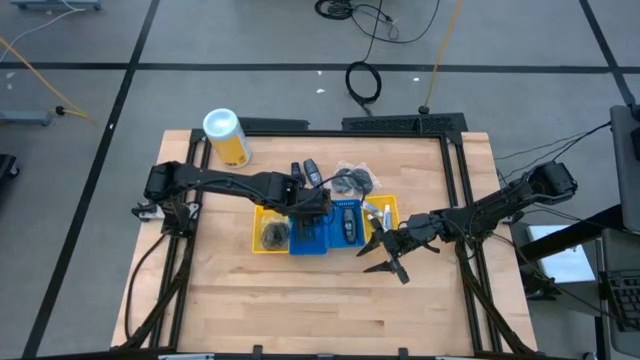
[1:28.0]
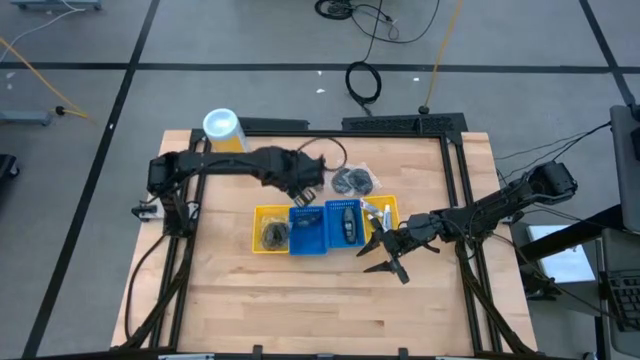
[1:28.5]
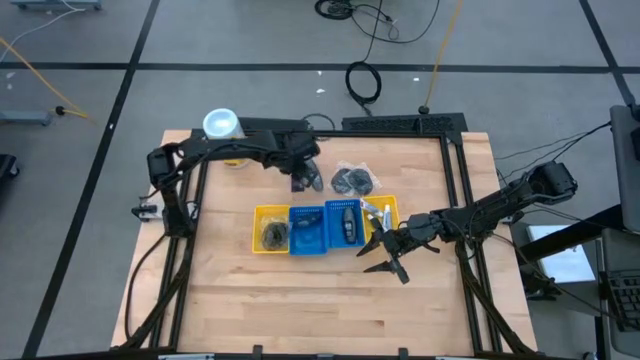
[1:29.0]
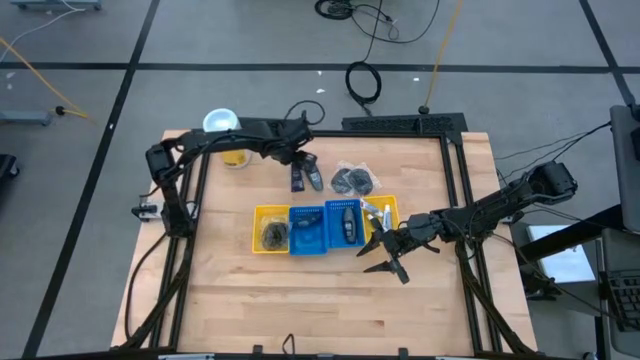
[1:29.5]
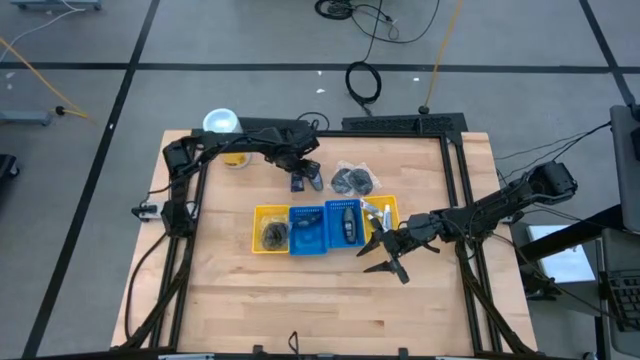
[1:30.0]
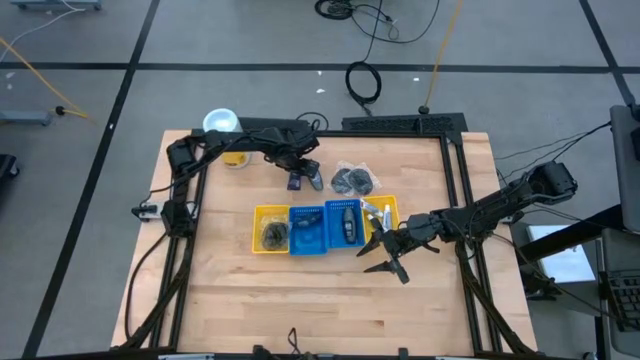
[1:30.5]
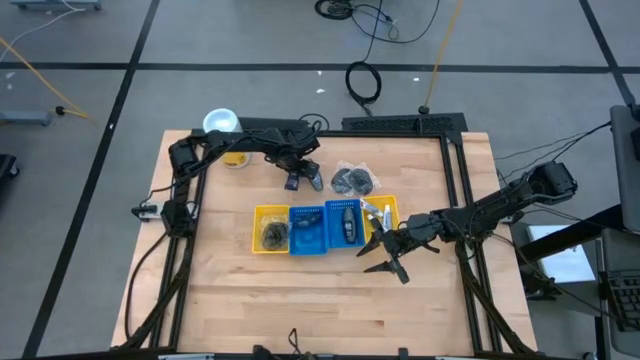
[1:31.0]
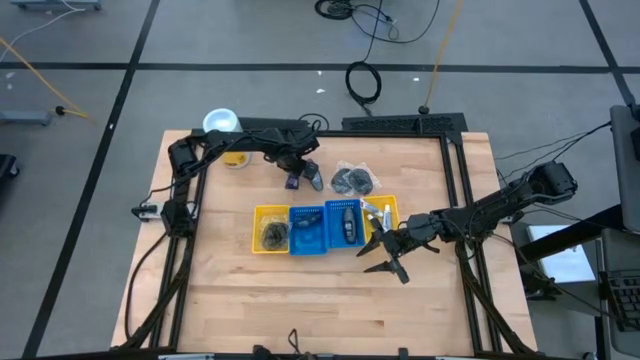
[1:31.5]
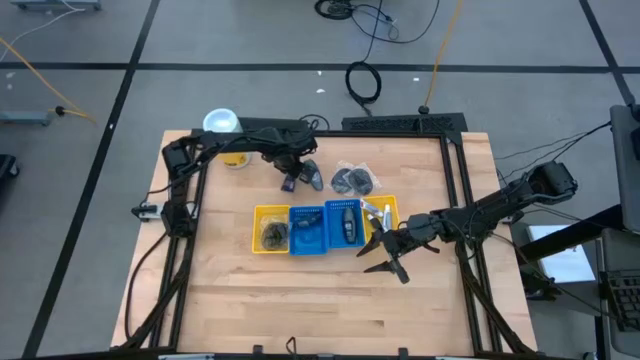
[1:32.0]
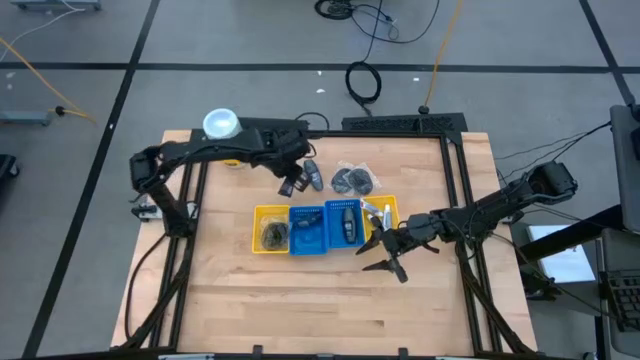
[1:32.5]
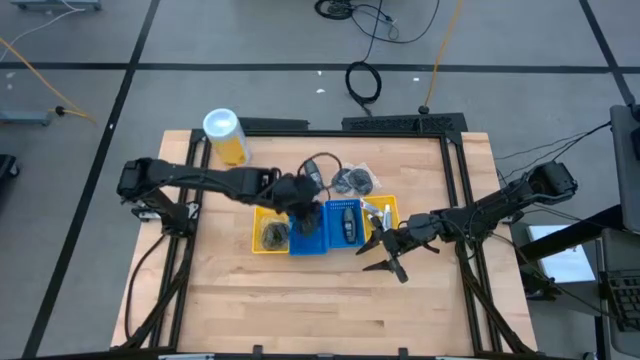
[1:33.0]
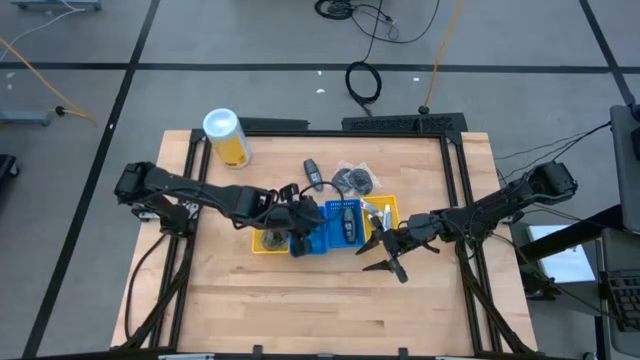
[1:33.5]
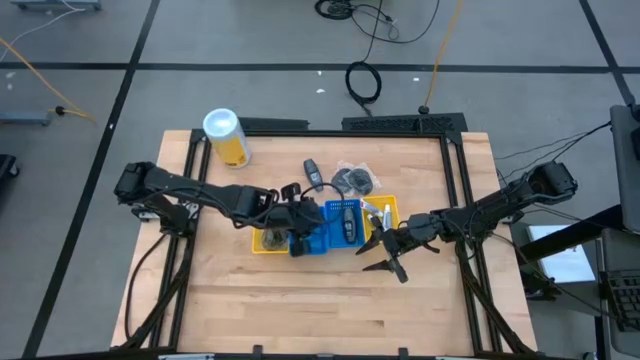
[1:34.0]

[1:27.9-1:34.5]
Task: Pick & Place Travel size toiletries
Put the shave cream into the left blue bin

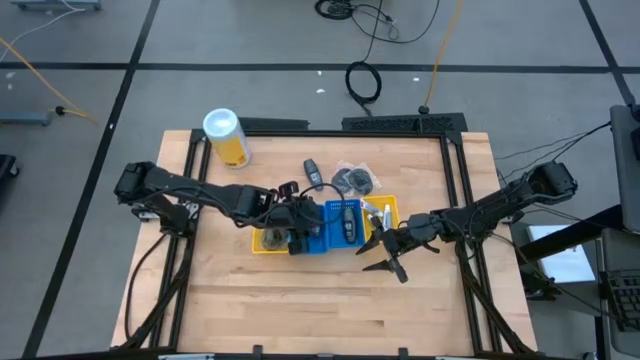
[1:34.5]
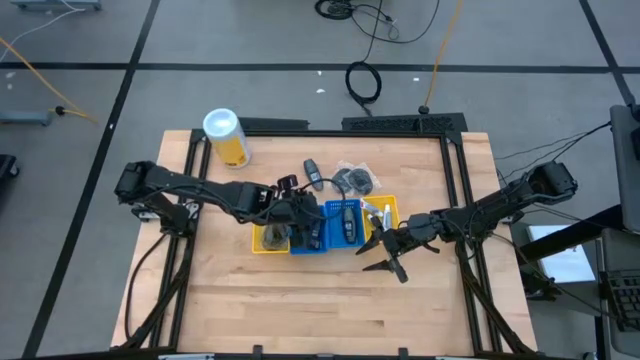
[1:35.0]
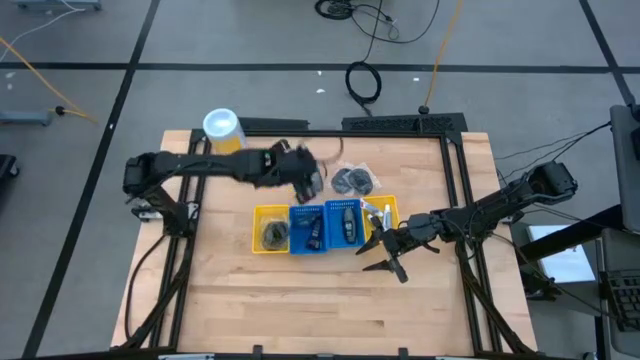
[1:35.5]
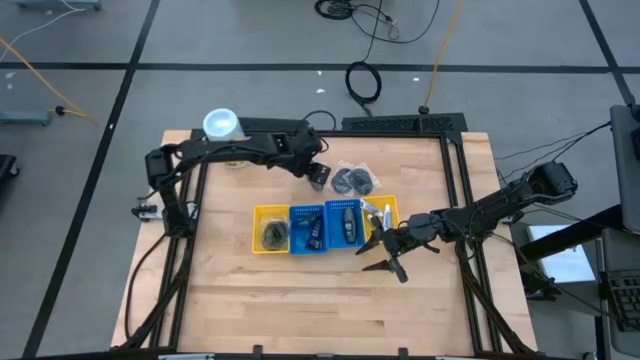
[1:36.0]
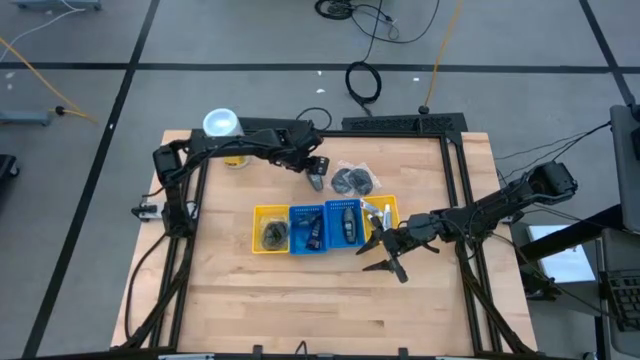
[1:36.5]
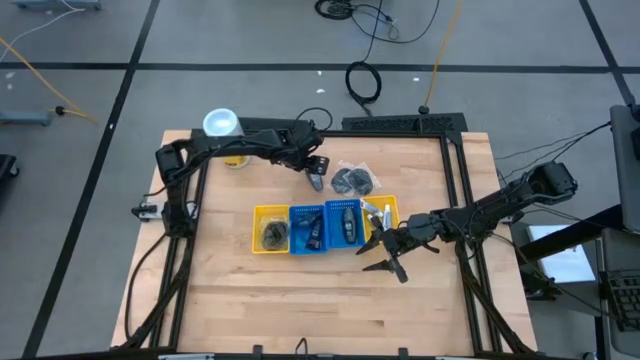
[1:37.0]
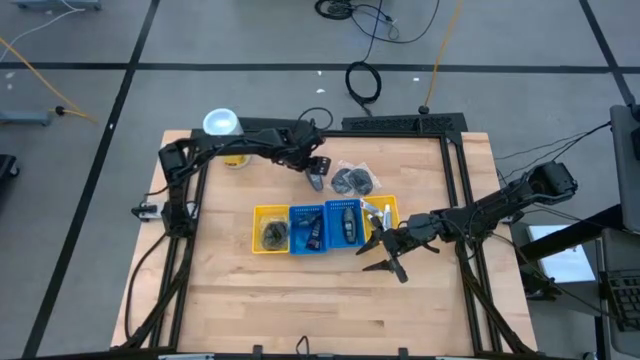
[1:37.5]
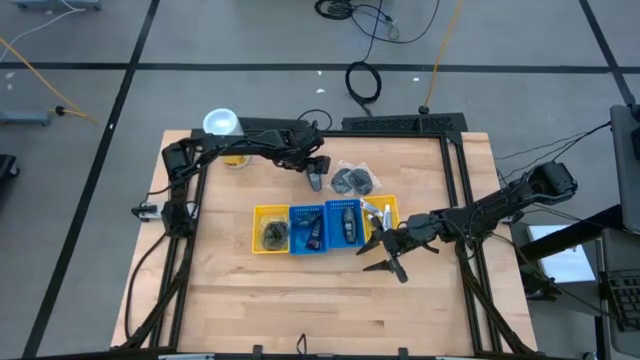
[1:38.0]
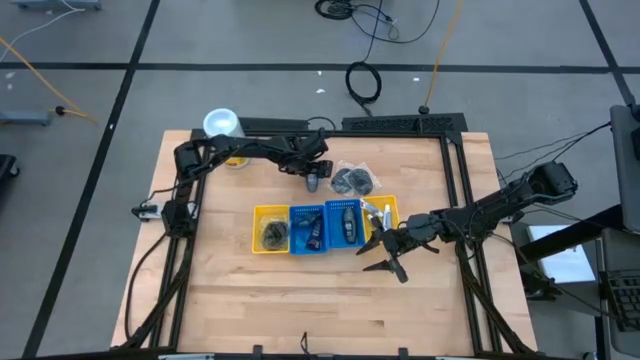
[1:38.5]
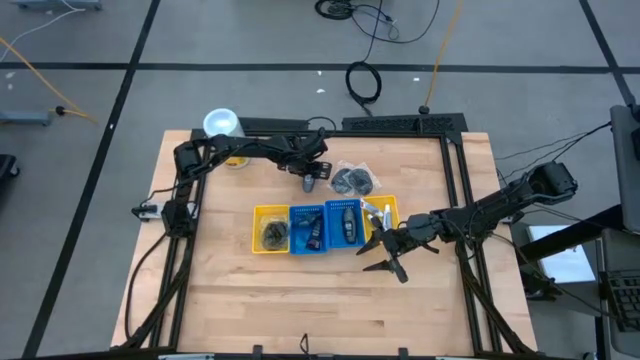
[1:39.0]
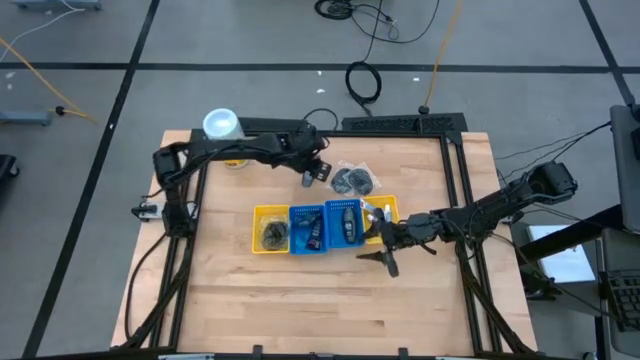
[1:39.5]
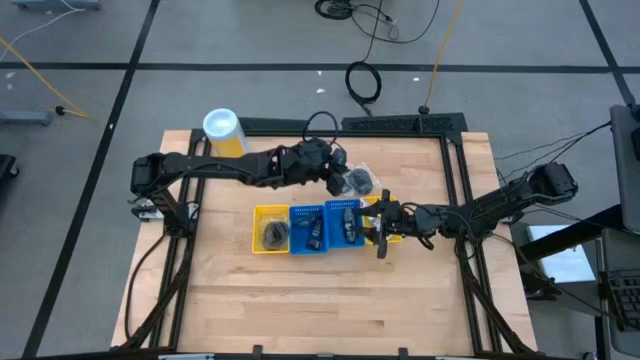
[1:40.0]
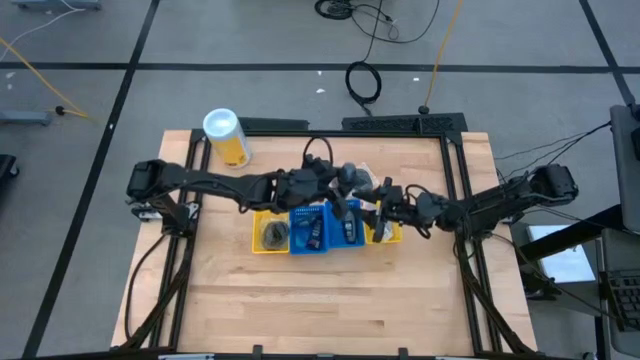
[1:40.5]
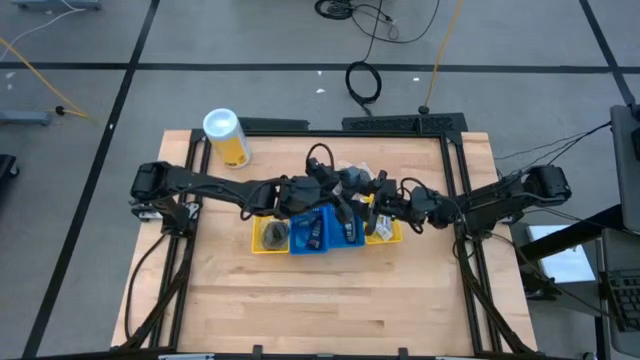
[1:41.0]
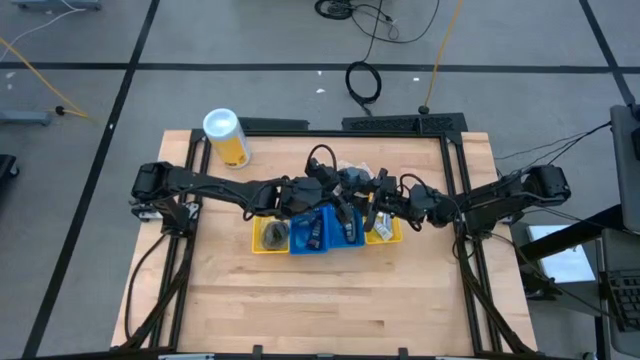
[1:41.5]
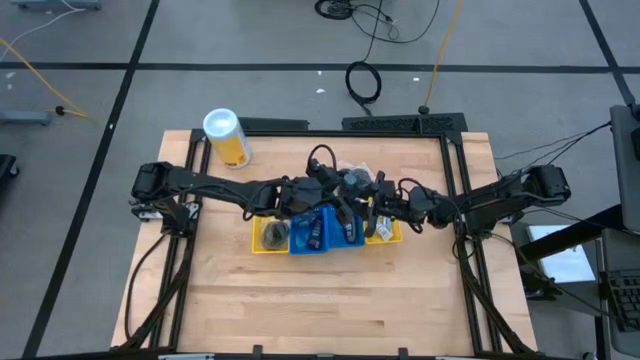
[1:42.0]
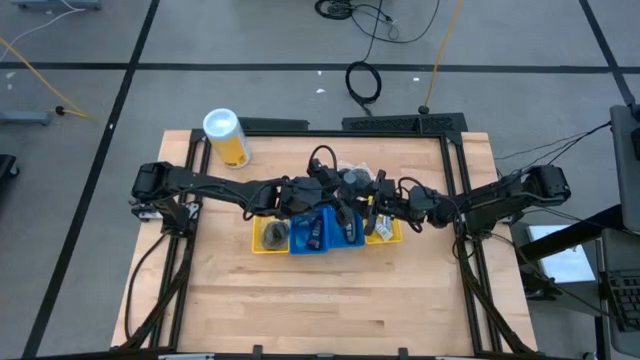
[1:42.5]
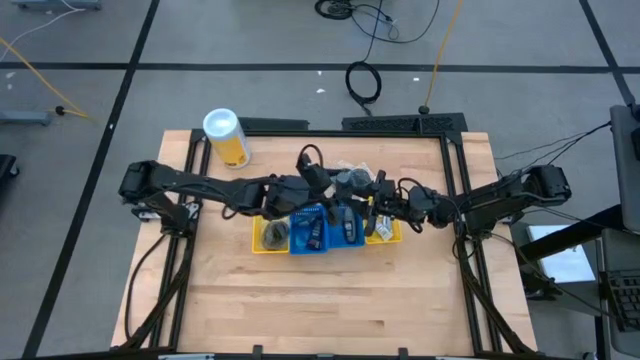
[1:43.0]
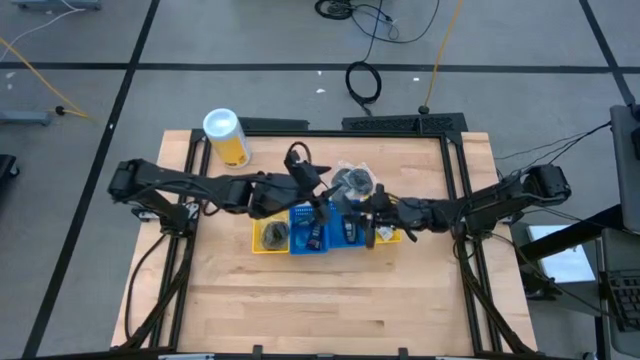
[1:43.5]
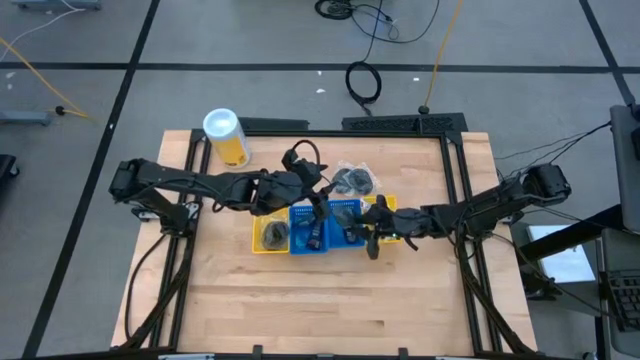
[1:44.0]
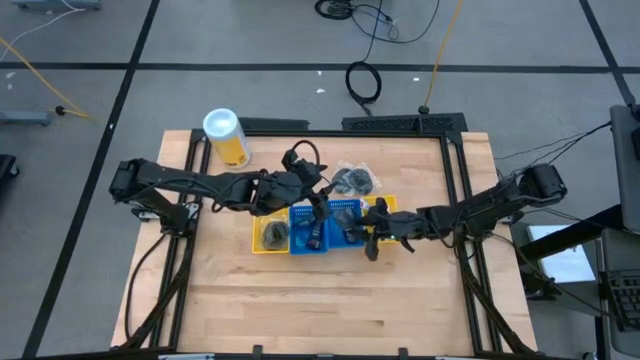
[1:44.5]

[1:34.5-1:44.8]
Put the deodorant into the right blue bin

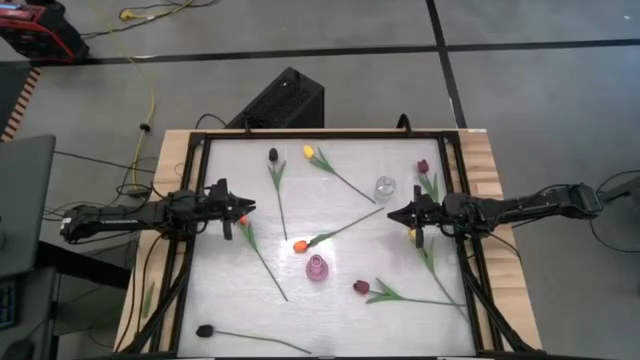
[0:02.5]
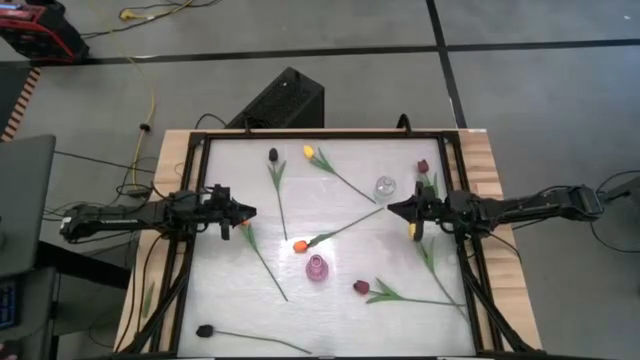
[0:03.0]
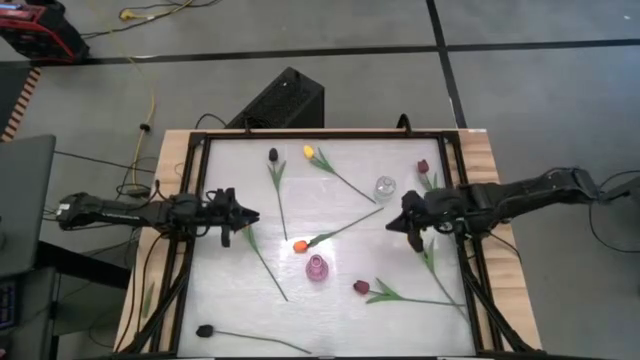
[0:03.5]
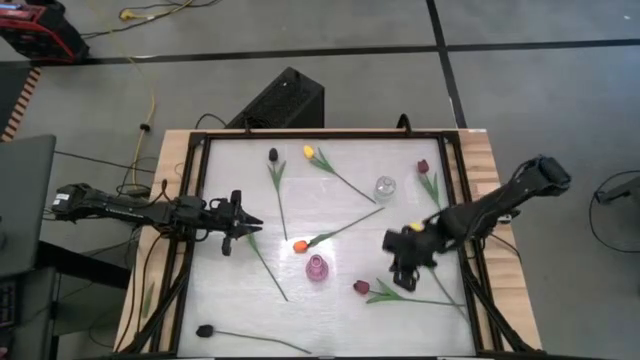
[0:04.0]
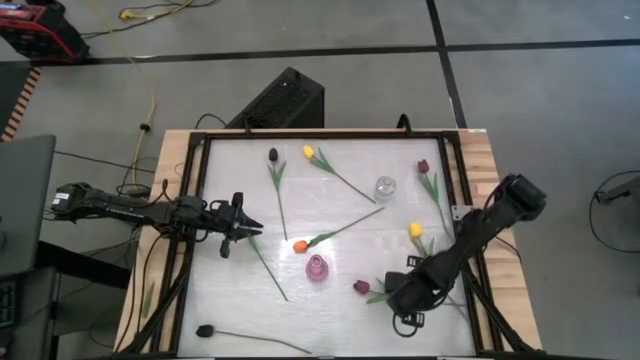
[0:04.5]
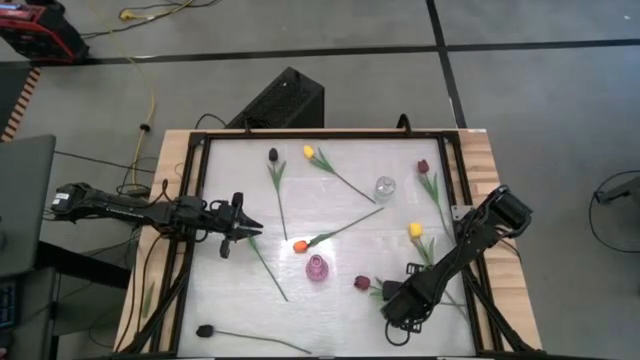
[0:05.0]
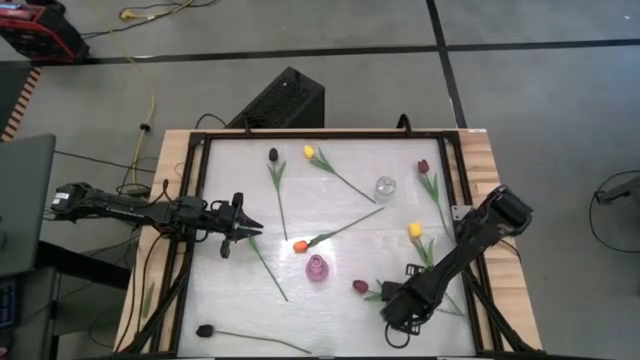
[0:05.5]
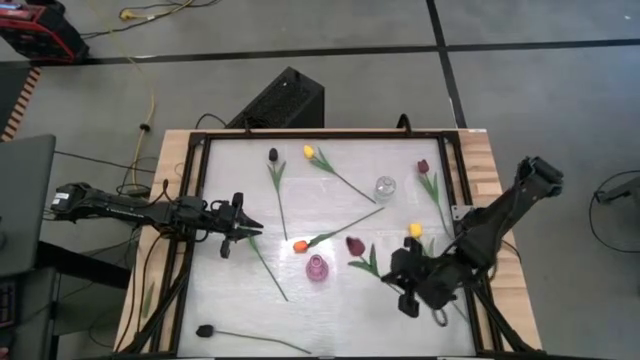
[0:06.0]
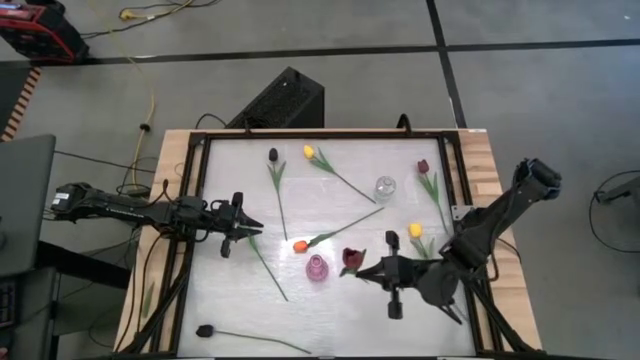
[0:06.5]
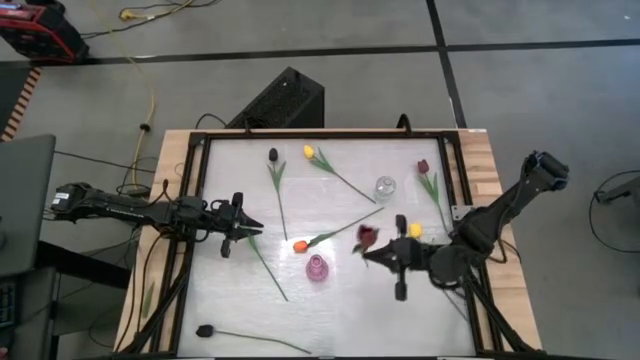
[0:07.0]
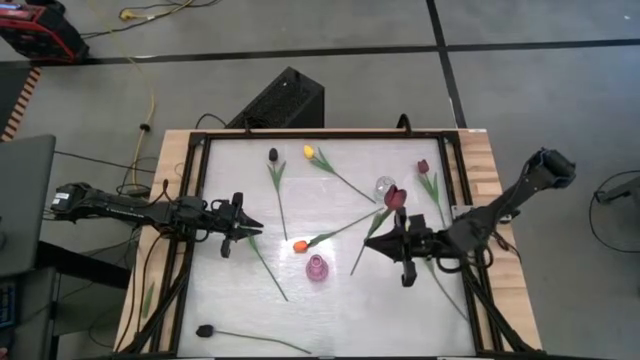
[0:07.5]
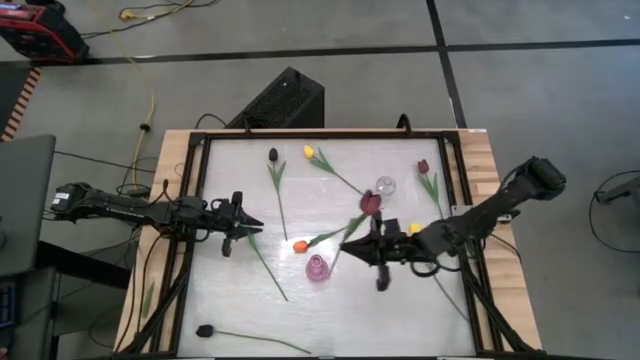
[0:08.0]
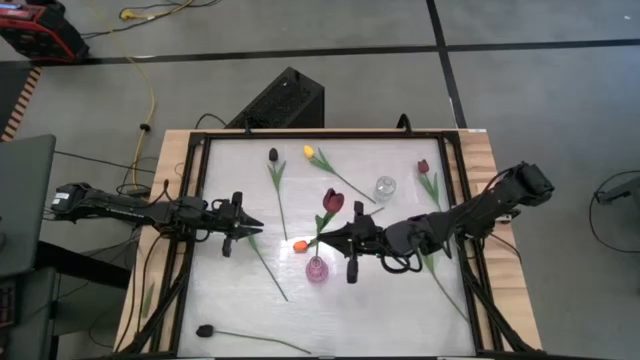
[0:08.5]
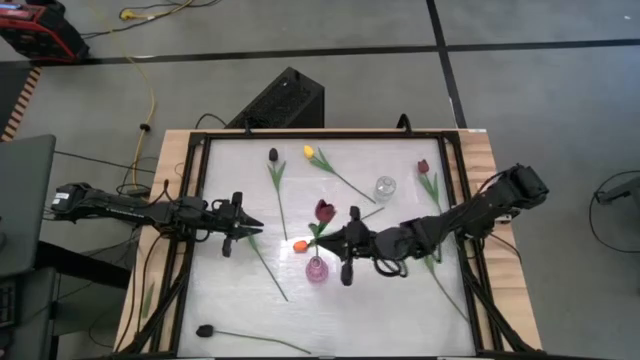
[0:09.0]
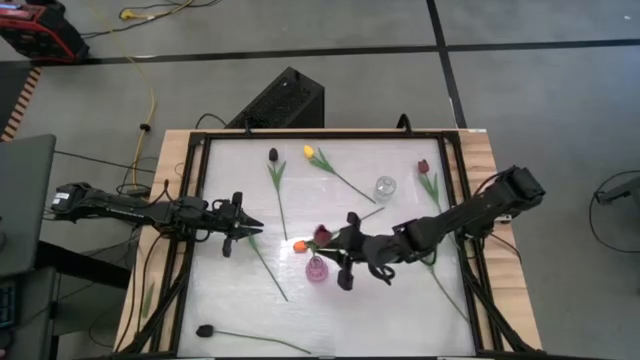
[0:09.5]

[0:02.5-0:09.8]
Task: Sort flowers into vase by color
Put the bottom red flower into the violet vase
